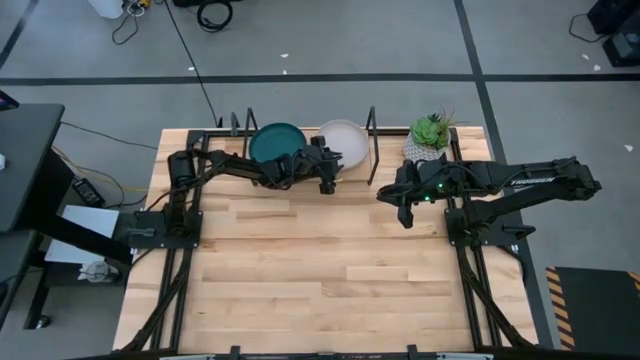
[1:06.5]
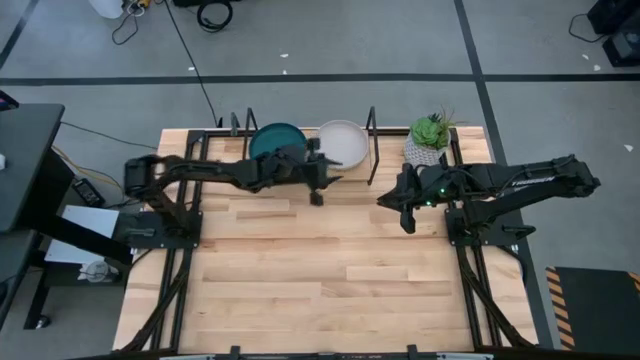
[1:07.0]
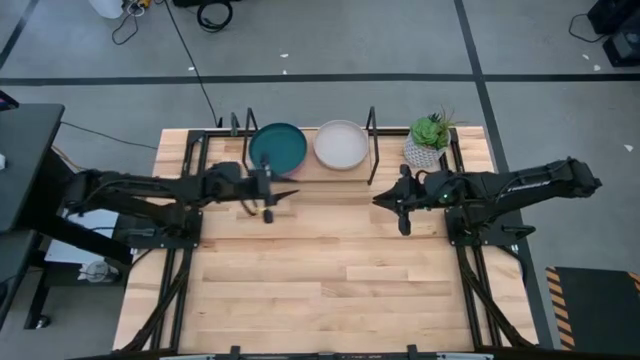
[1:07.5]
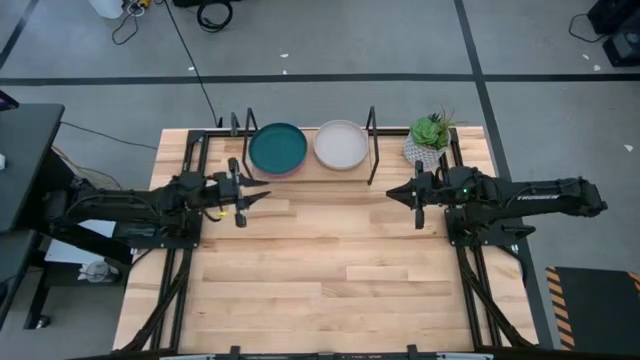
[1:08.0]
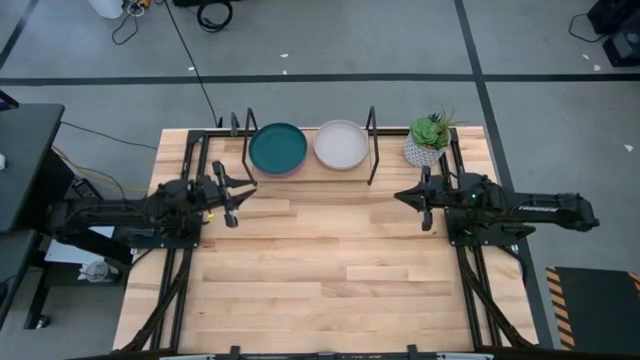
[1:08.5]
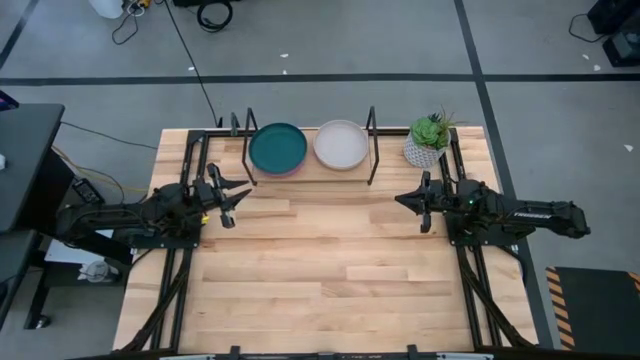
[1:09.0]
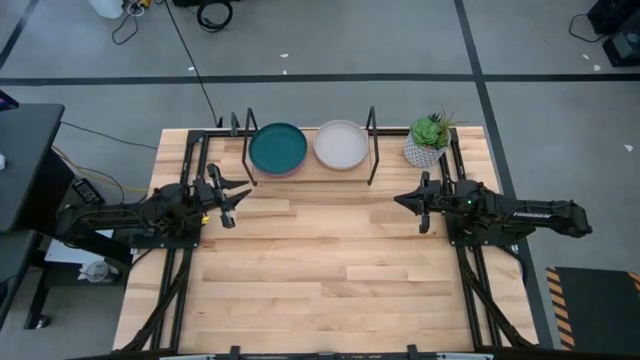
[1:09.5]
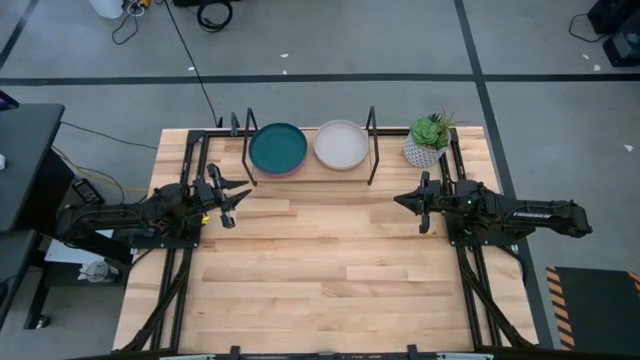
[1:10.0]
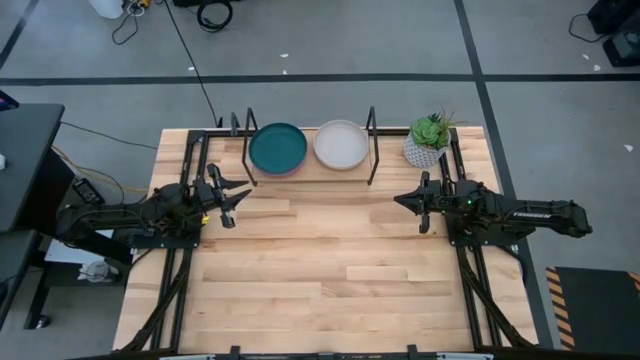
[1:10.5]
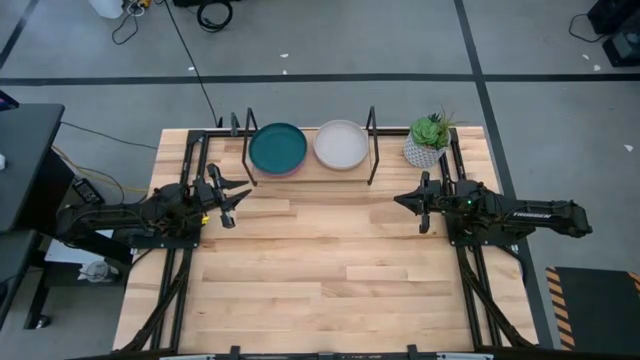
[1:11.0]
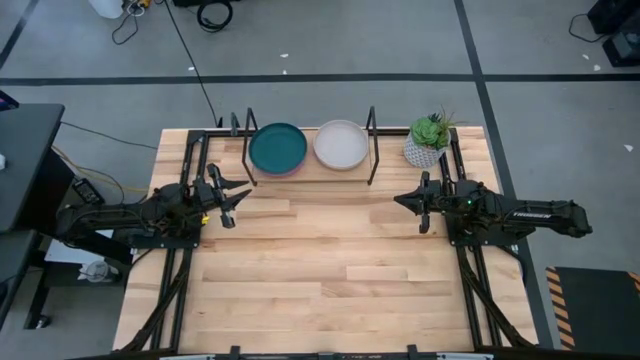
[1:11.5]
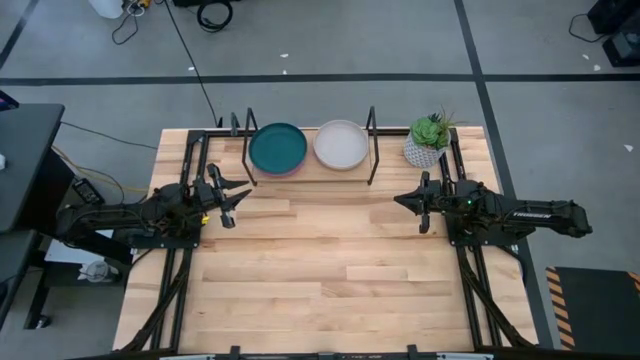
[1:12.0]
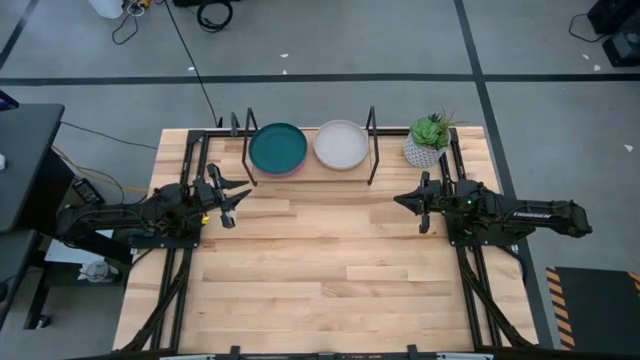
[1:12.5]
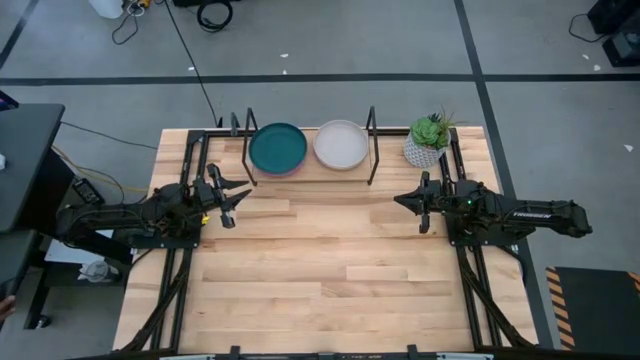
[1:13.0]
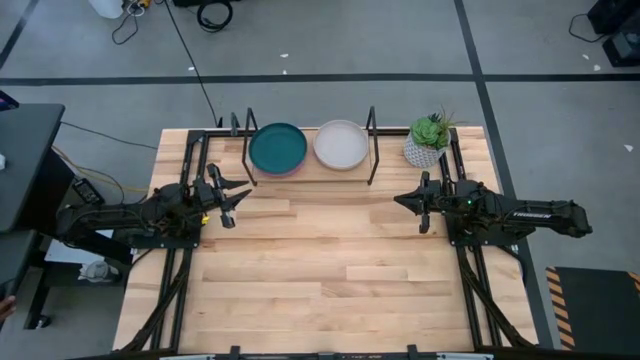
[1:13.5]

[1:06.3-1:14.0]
Task: Place and stack plates onto a shelf
Return to Home Position

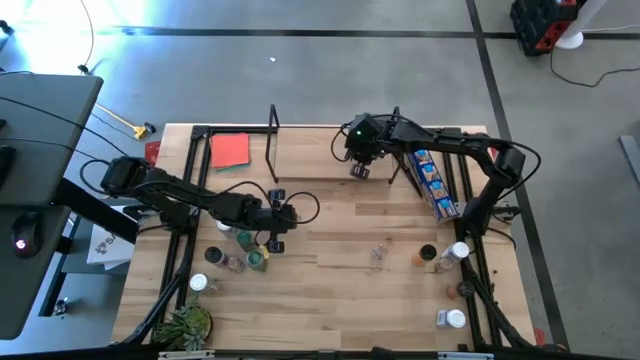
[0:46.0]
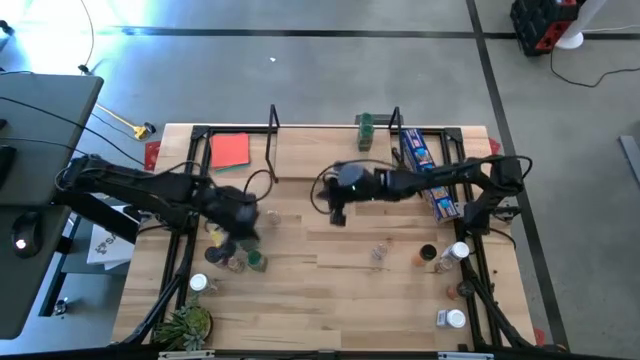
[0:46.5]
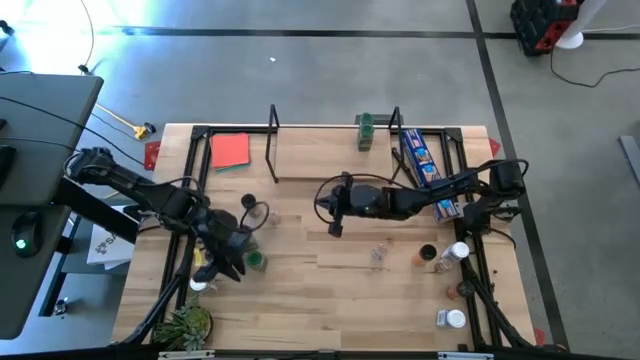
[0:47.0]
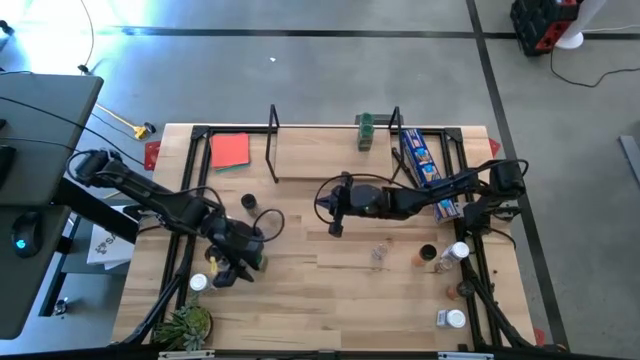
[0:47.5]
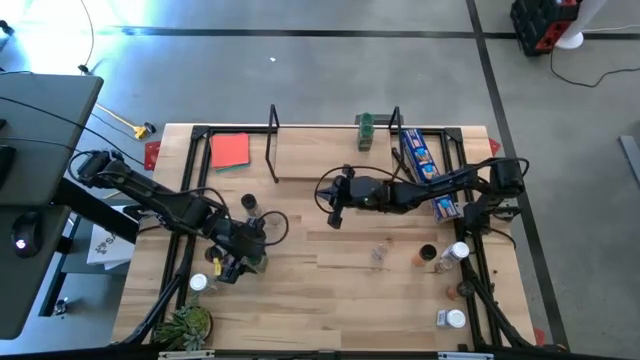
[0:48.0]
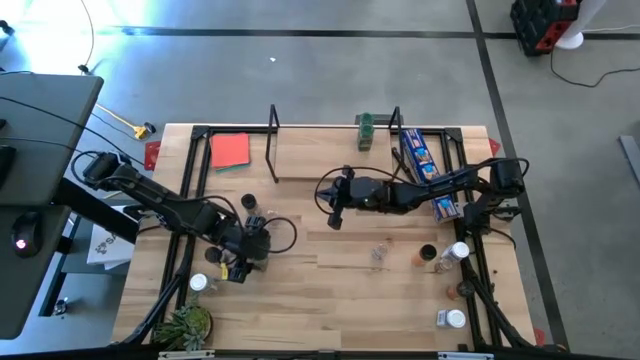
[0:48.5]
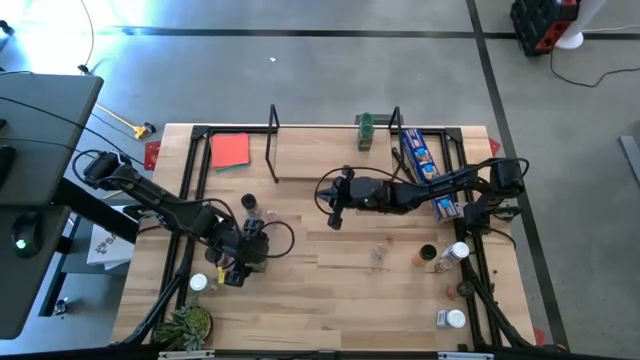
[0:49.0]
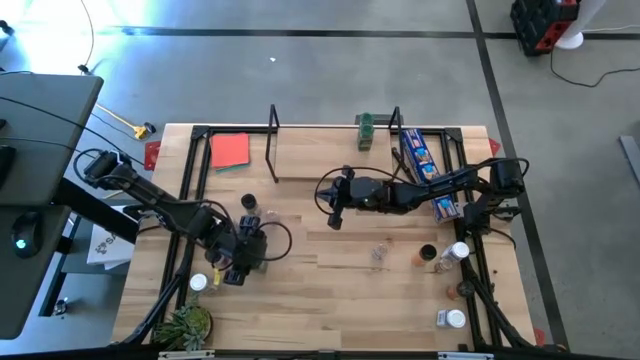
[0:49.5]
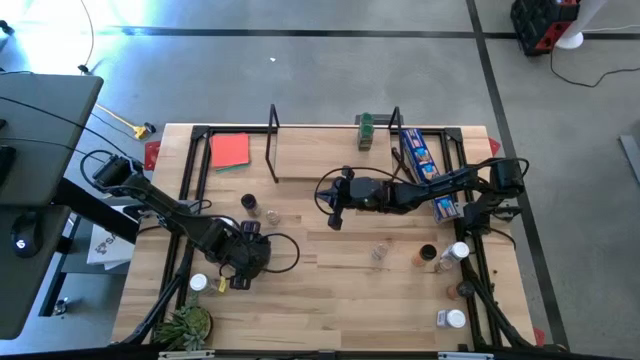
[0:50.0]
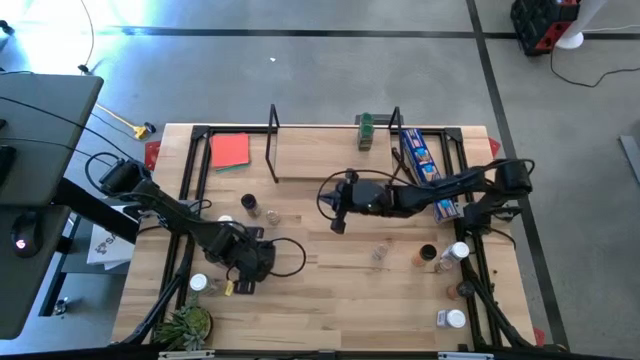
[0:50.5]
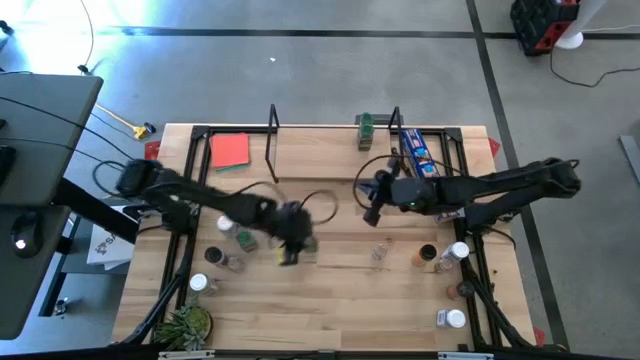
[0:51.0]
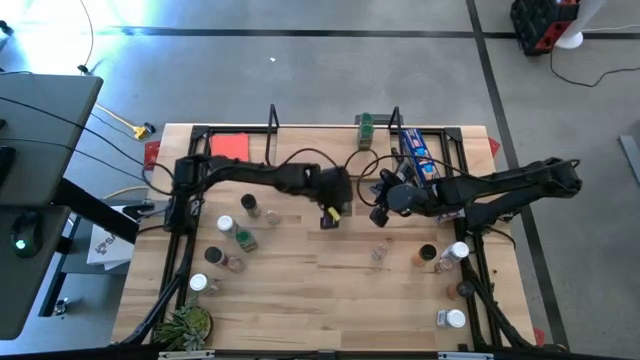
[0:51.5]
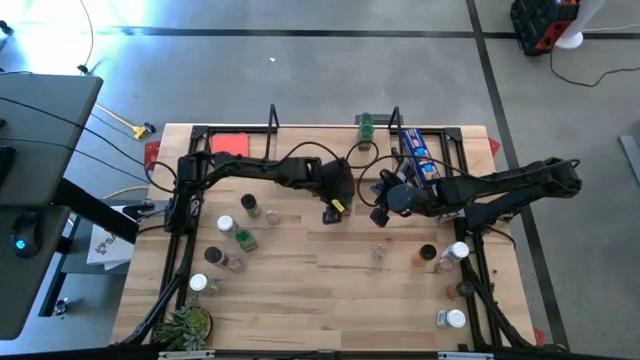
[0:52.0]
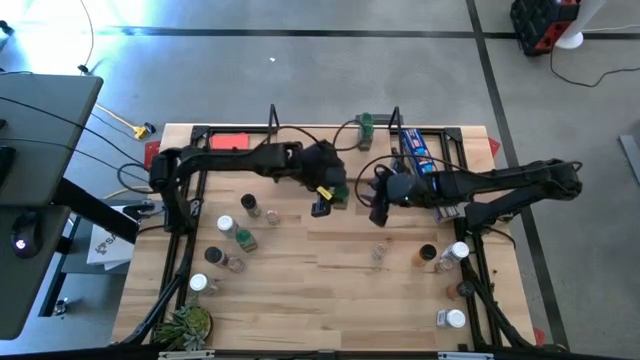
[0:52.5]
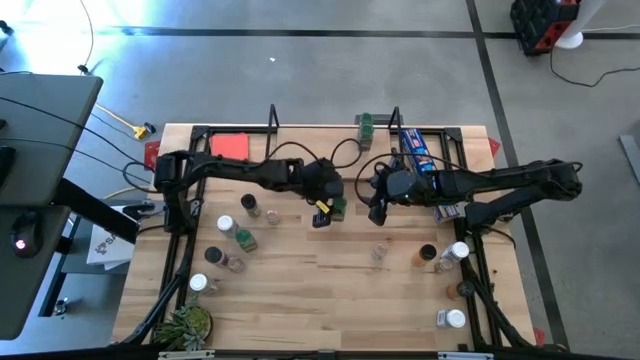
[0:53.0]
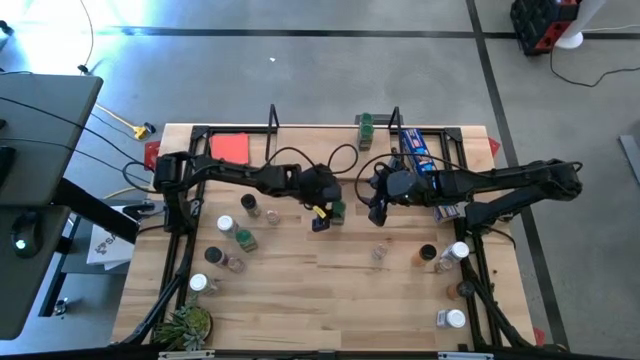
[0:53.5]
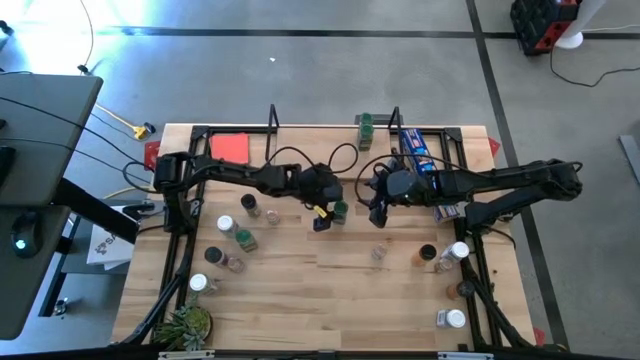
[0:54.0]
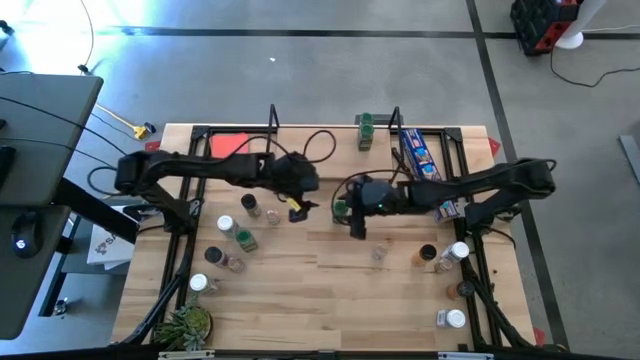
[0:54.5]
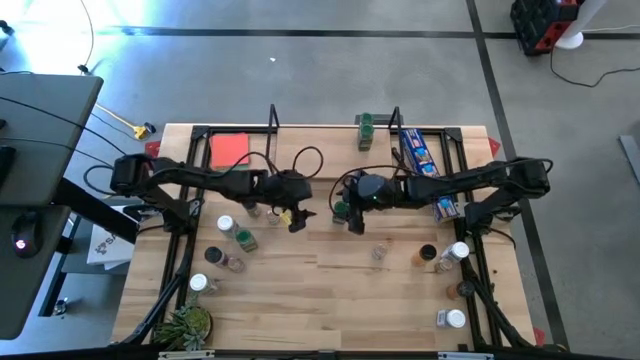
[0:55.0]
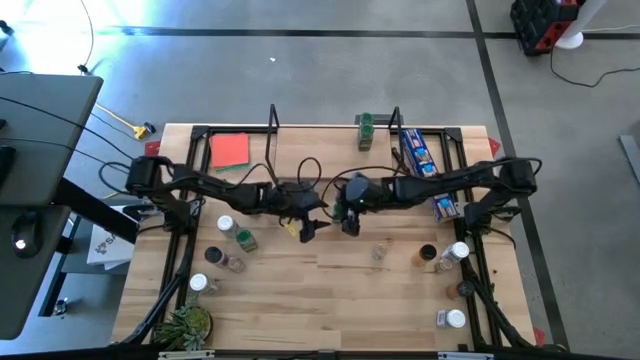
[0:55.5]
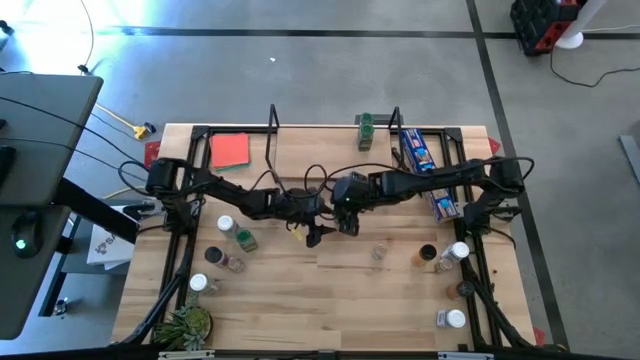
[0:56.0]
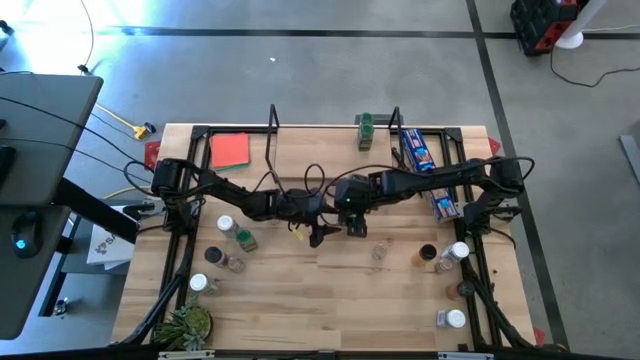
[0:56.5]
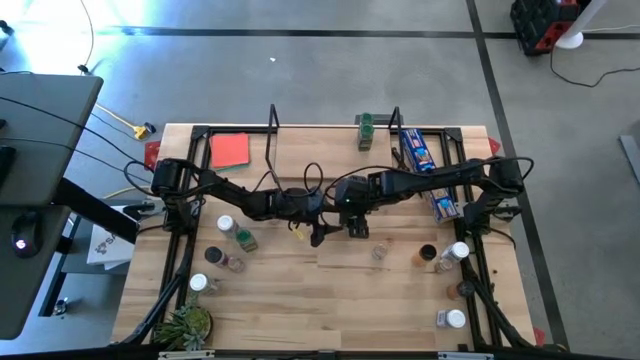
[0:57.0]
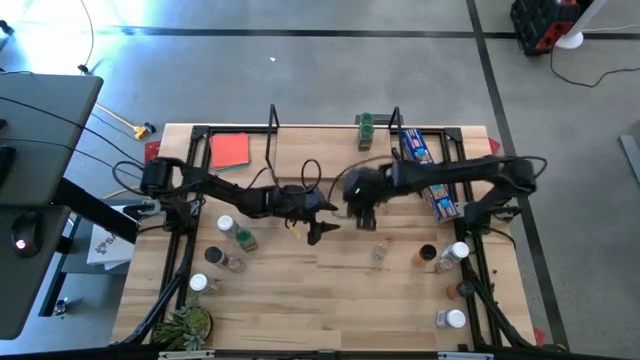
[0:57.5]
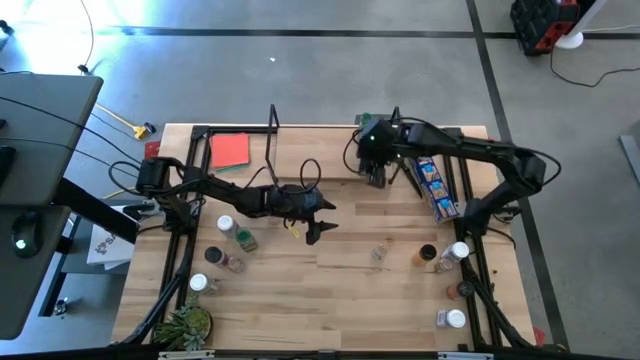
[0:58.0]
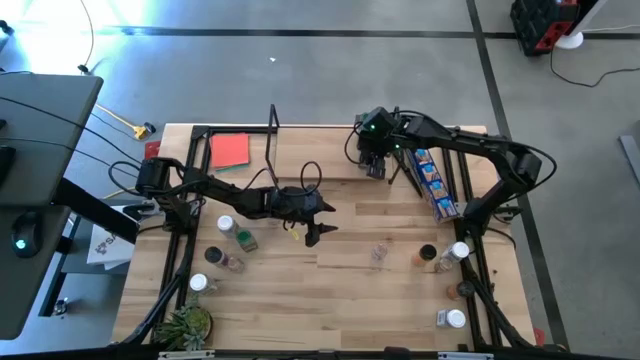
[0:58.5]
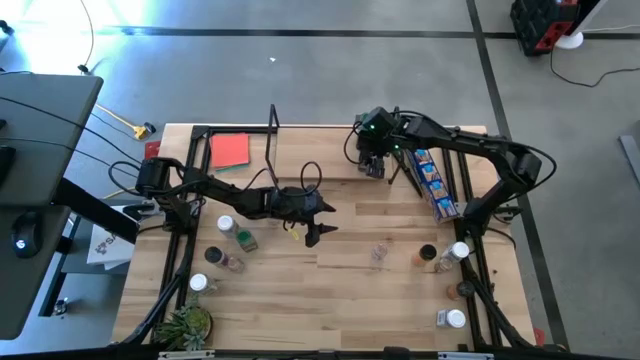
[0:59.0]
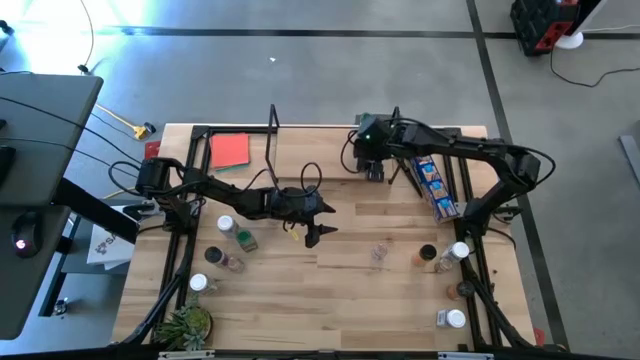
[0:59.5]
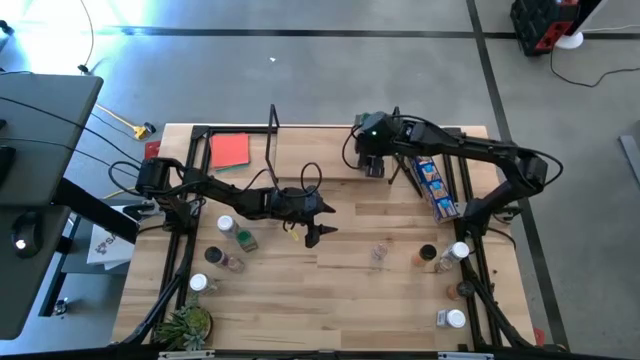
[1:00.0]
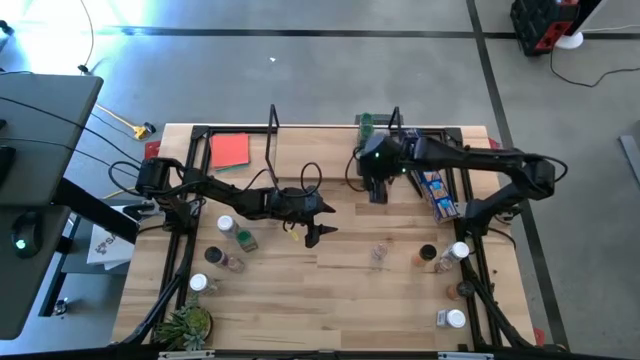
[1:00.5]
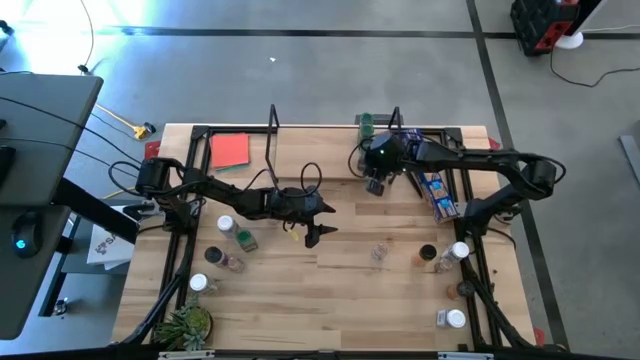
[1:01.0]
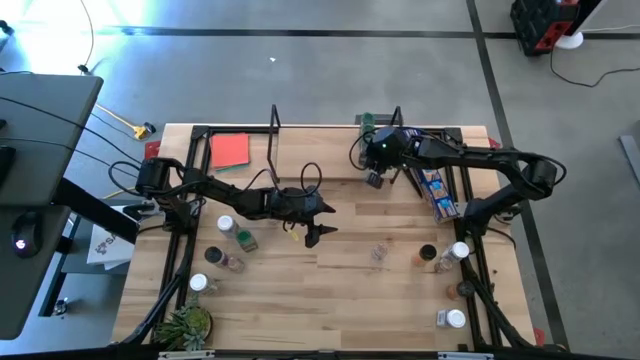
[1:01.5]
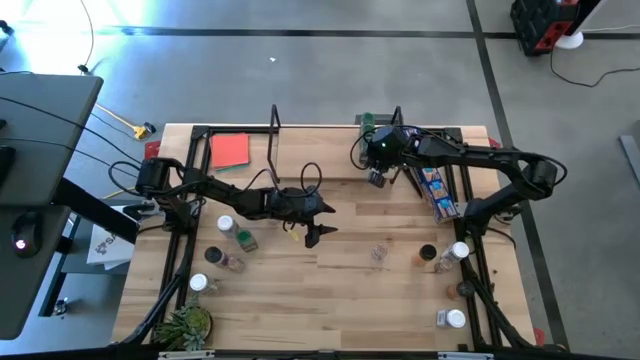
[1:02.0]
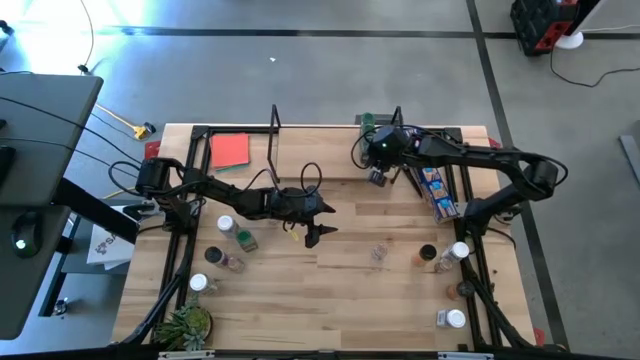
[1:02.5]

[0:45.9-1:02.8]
Task: Shelf spices
Put the green seasoning bottle on the shelf aligned with the other green seasoning bottle
